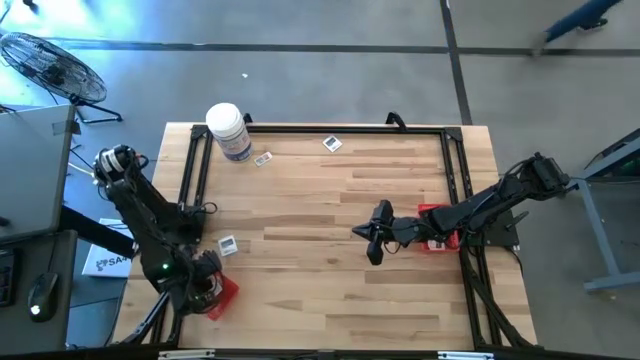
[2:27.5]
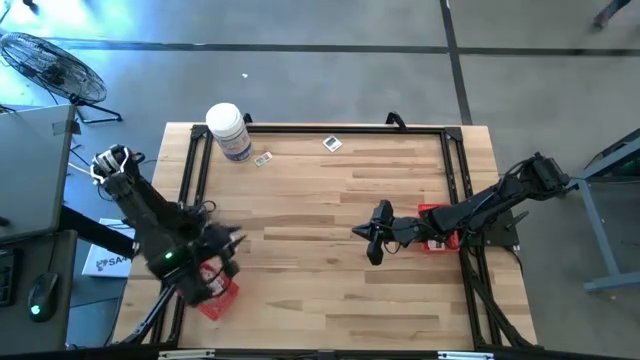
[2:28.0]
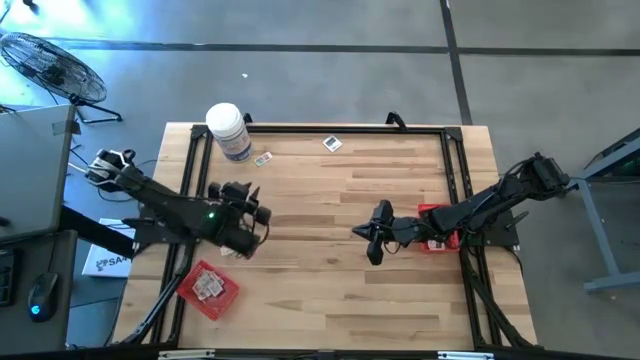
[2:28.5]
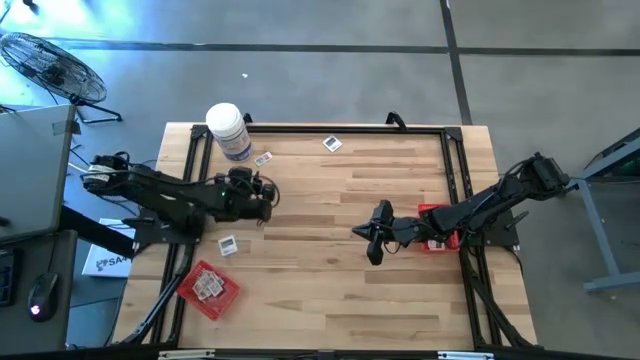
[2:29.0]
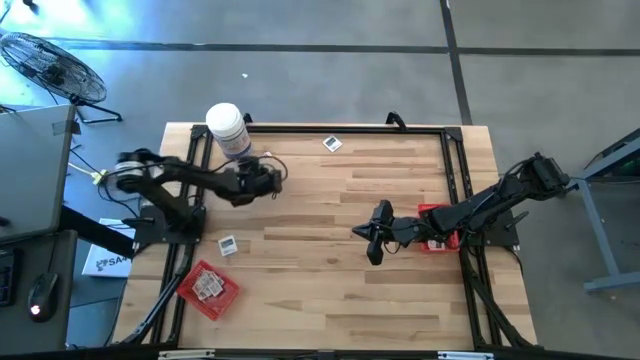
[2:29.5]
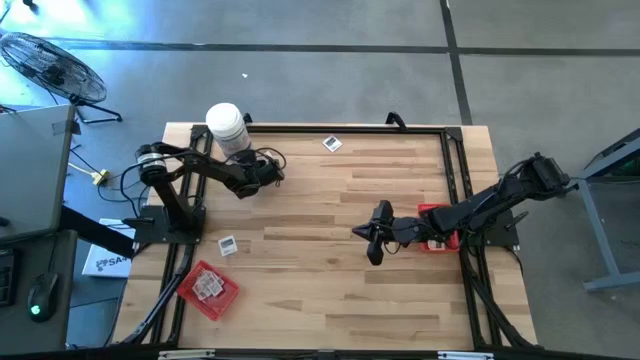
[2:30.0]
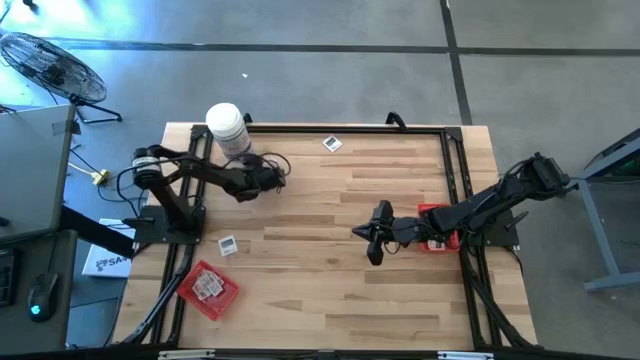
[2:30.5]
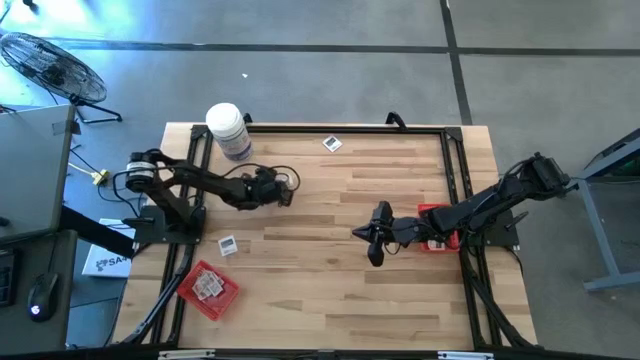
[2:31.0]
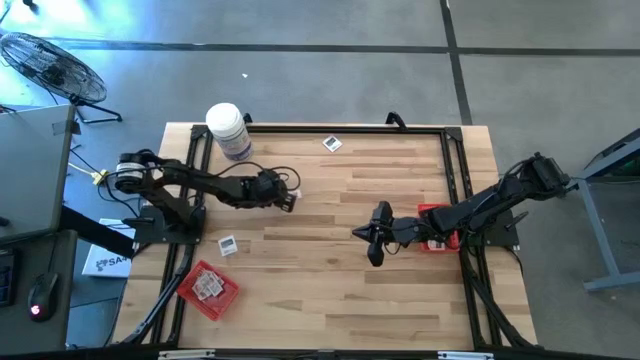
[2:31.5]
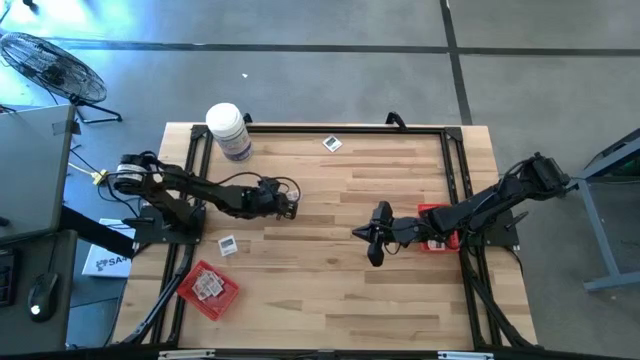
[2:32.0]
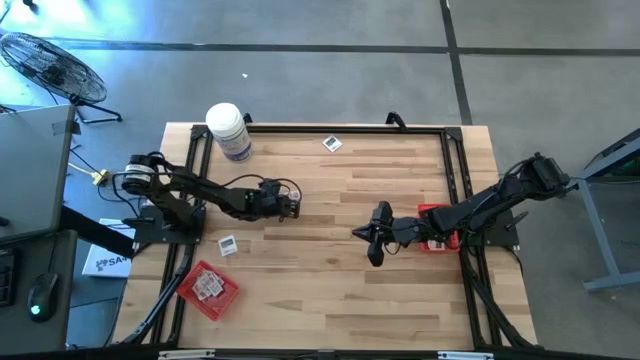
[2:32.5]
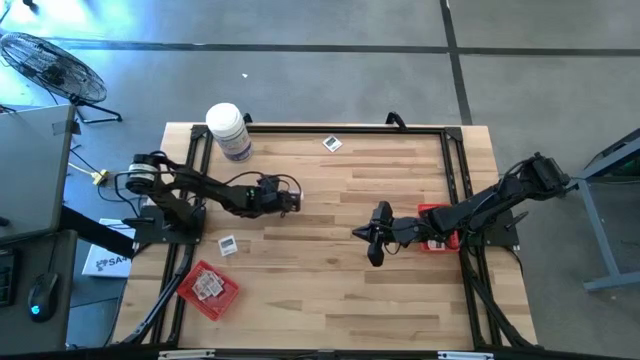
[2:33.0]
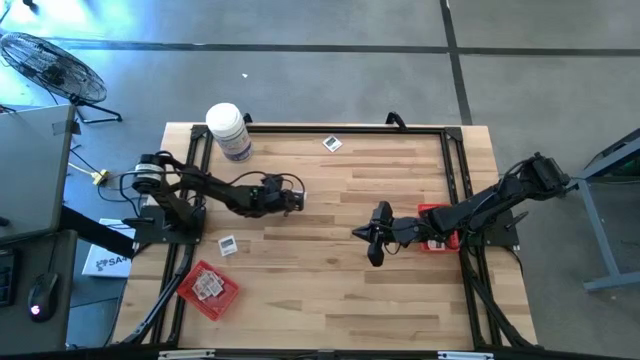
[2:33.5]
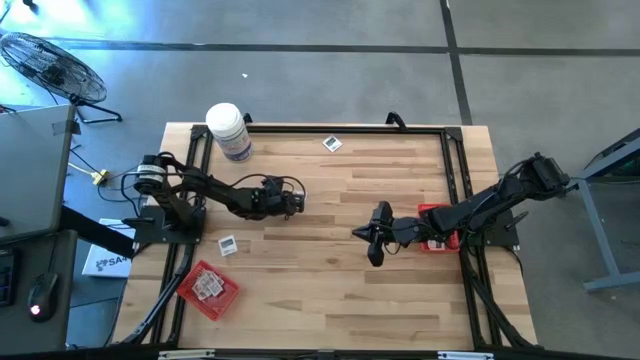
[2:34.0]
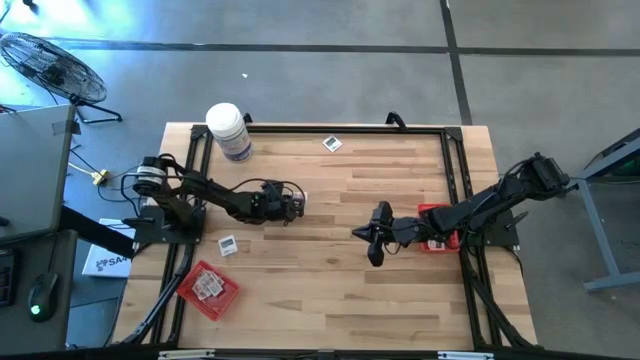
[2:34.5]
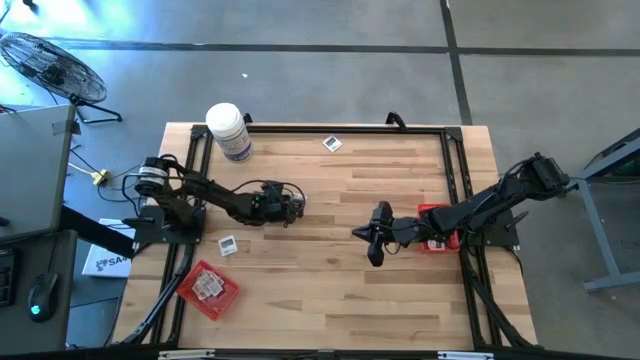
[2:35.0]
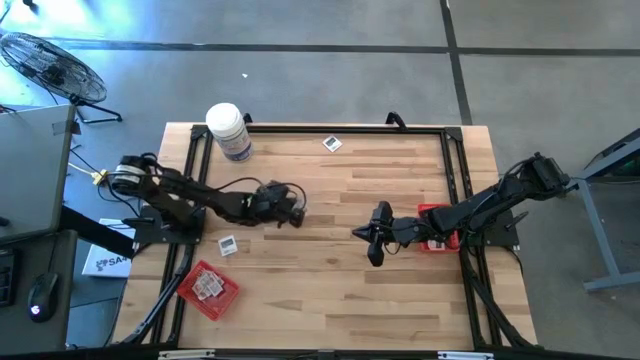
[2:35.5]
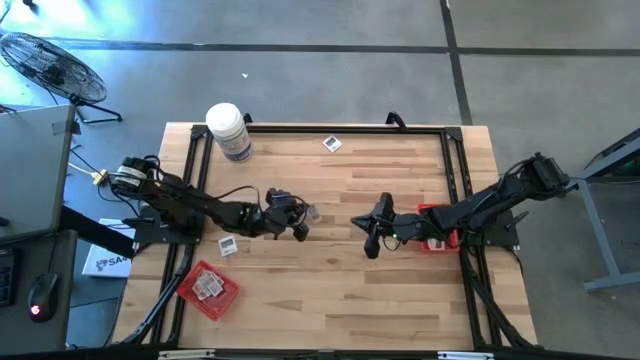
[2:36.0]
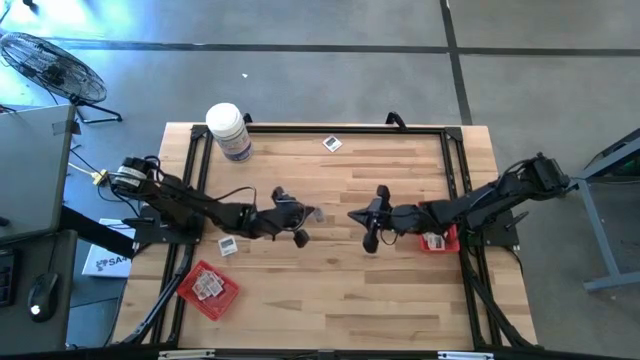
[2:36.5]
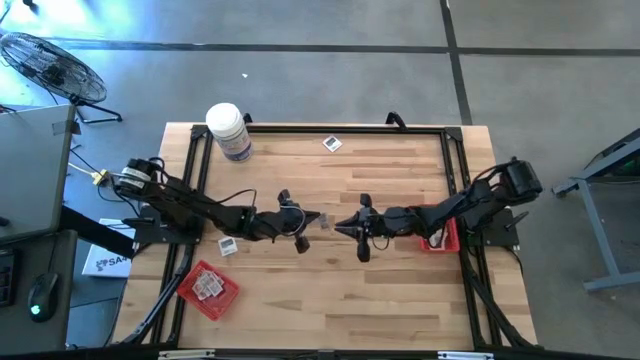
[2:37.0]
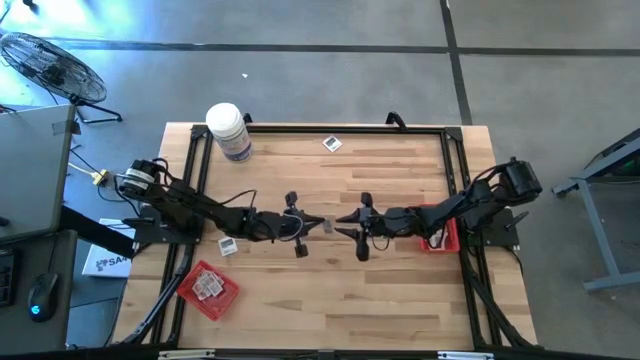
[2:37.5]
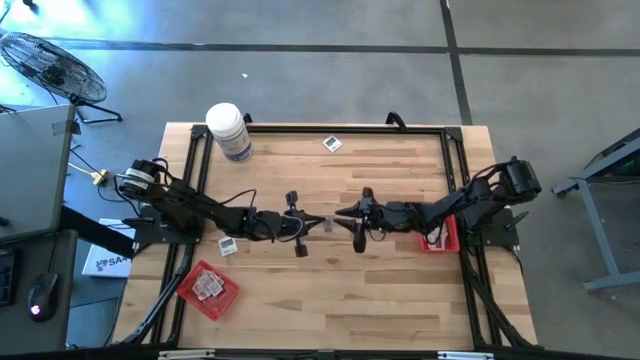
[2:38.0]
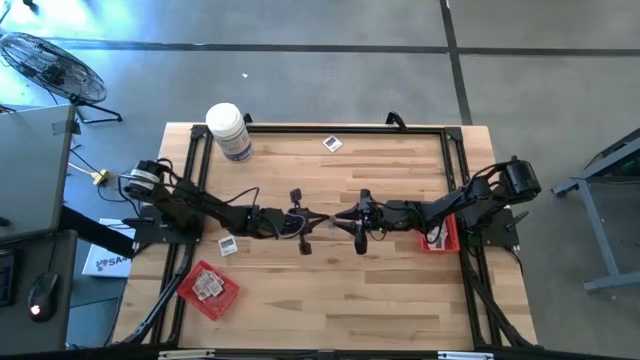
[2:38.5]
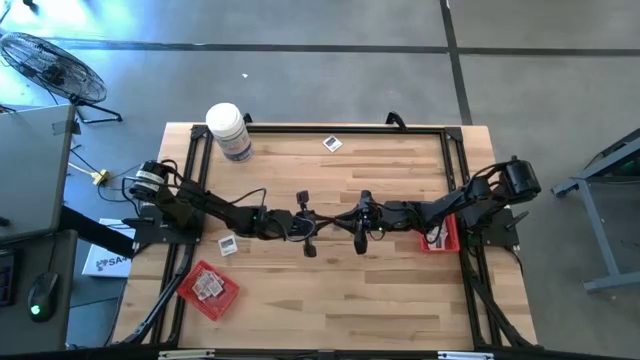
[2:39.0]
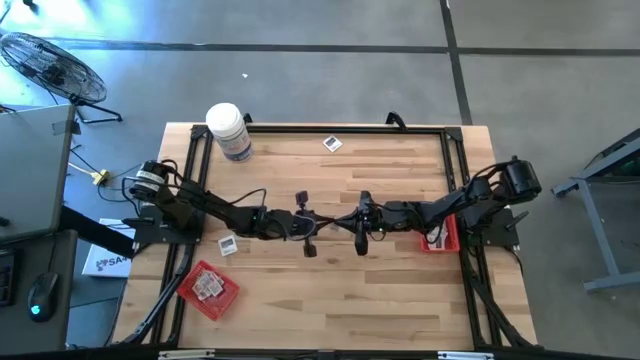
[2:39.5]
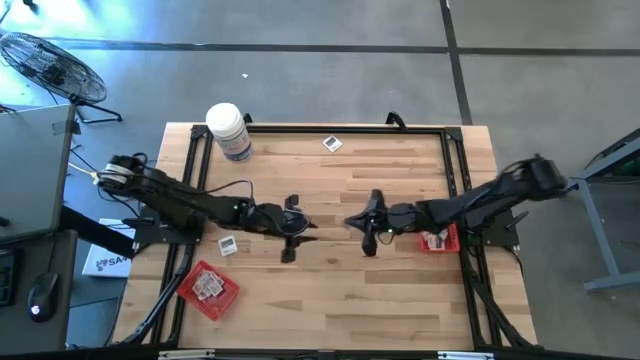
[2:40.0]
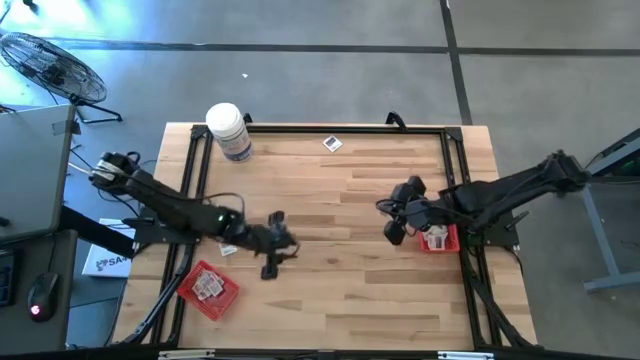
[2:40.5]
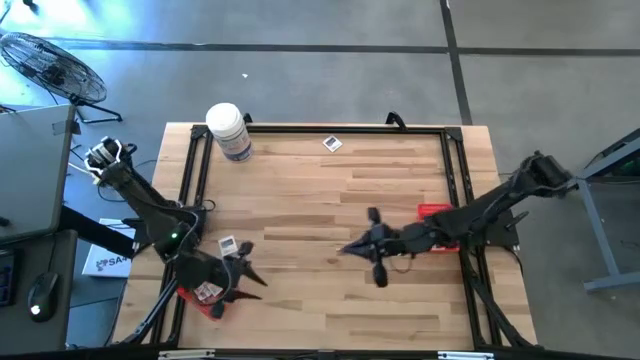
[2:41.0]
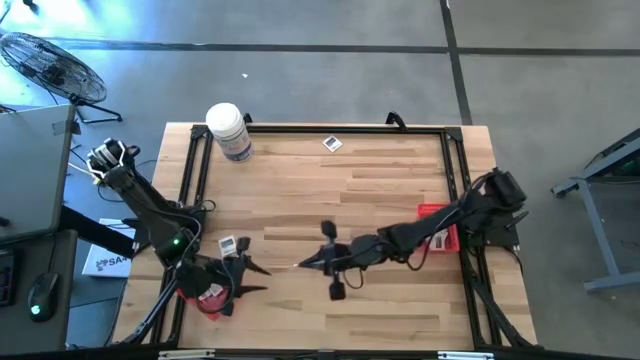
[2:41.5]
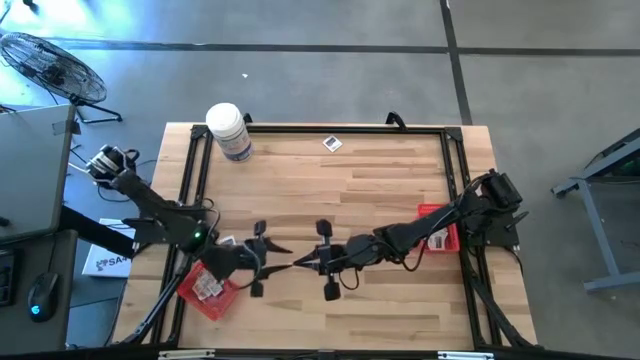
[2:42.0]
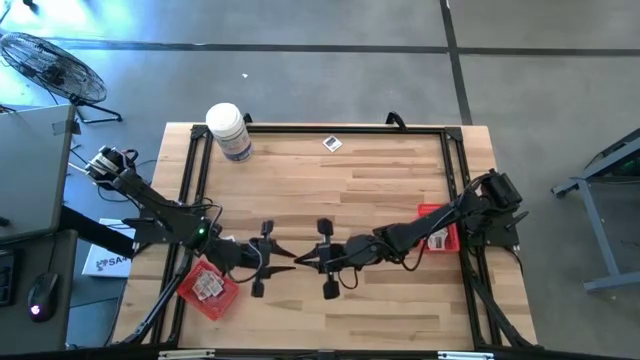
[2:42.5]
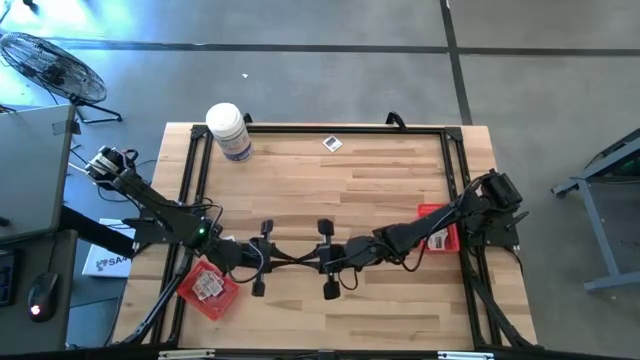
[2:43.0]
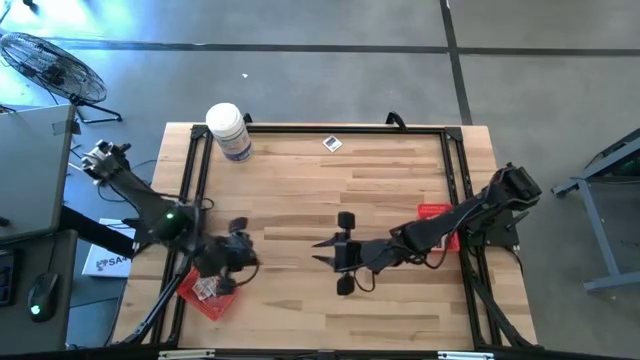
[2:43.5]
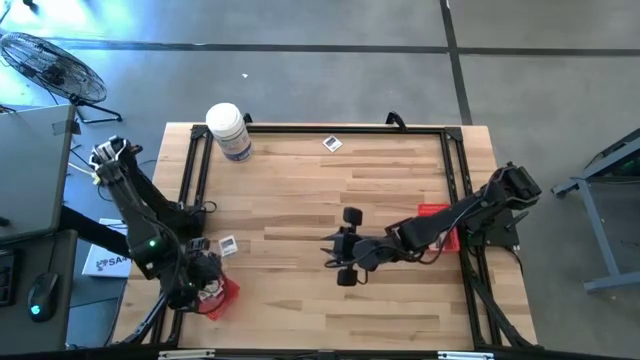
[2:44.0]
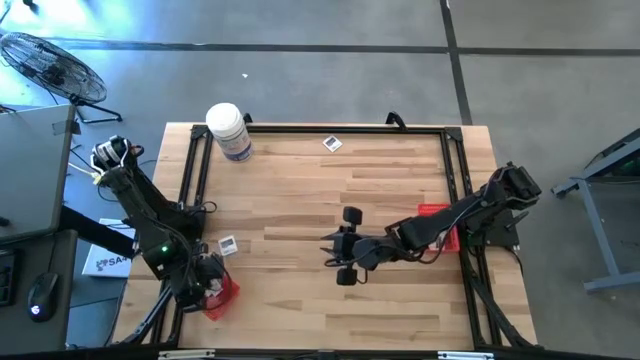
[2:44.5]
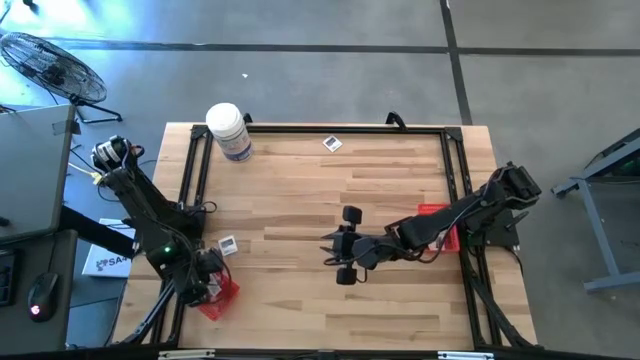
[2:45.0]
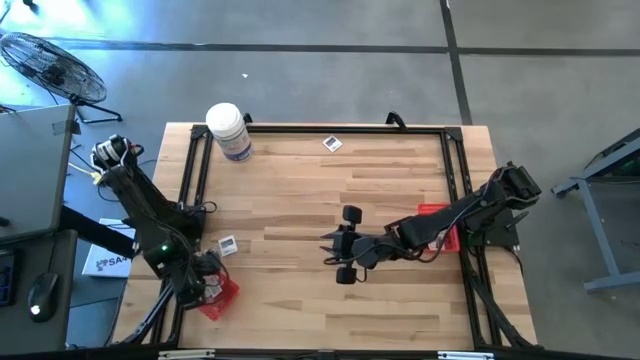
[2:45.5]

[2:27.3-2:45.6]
Task: Pick & Place First Aid Supplies
Put the ointment pack into the left red bin

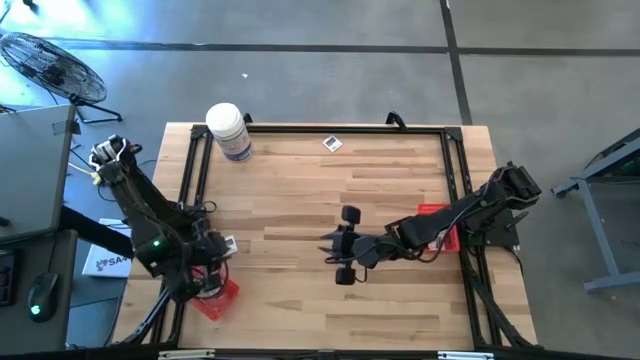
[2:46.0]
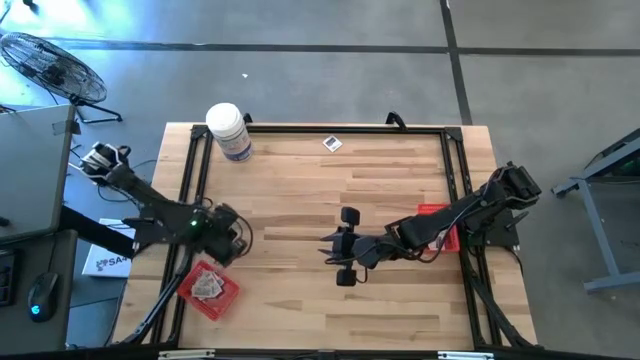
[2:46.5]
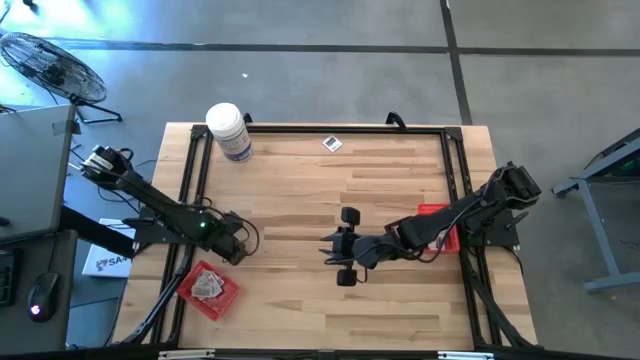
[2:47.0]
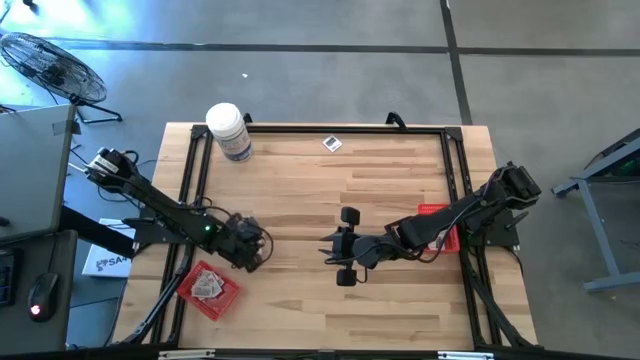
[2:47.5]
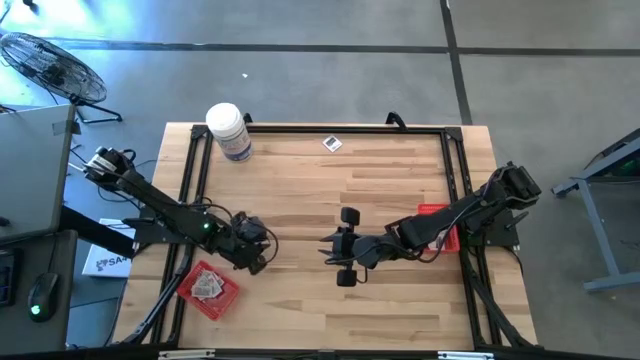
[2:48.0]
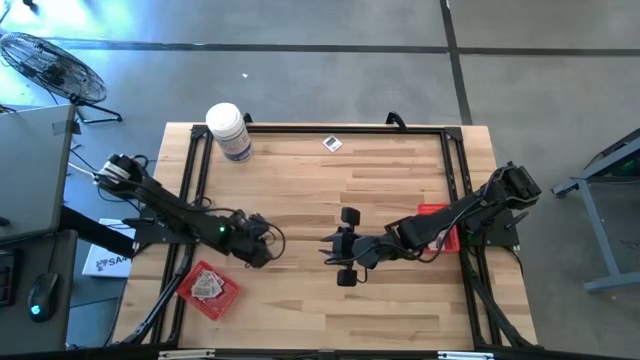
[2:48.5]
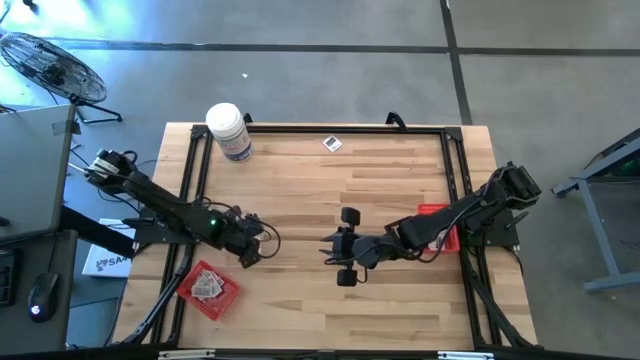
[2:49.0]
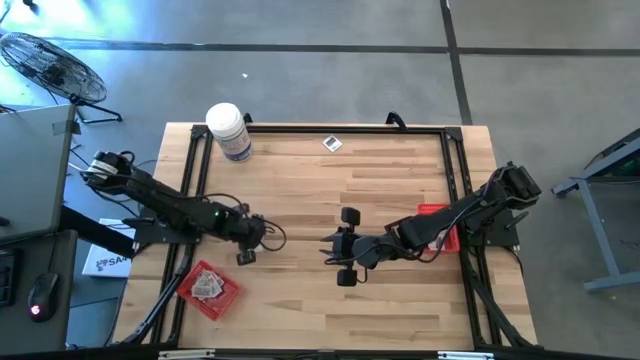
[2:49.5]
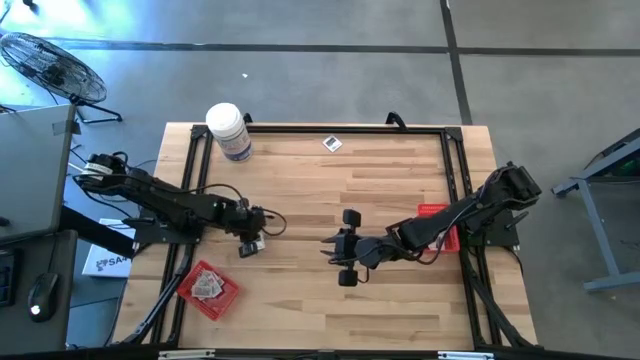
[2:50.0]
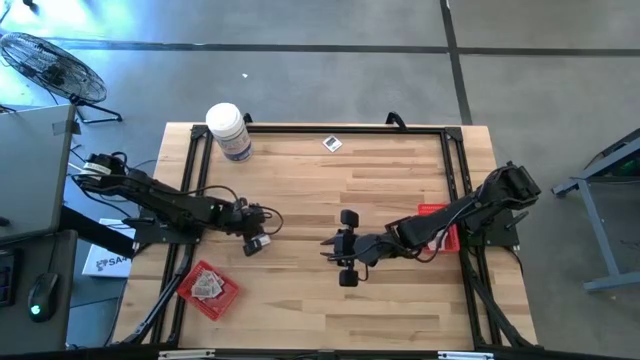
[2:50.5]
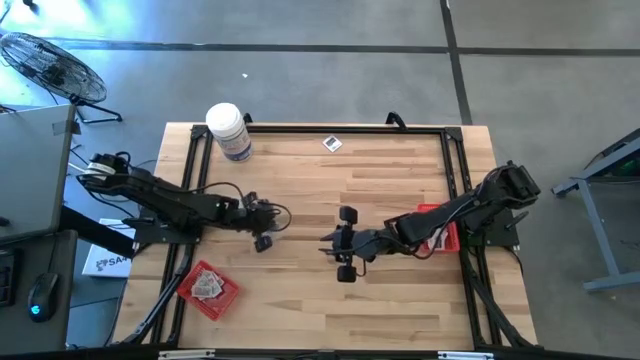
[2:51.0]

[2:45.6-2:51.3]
Put the towelette pack into the right red bin
